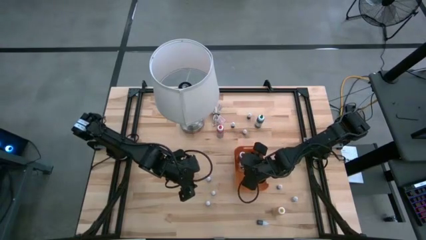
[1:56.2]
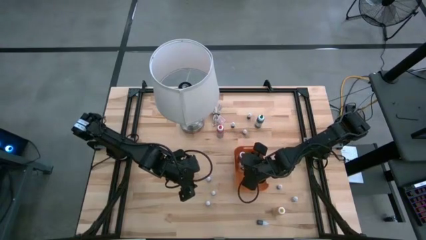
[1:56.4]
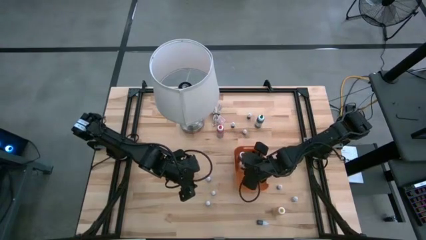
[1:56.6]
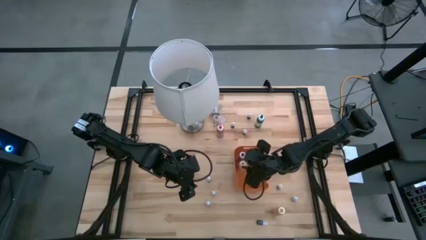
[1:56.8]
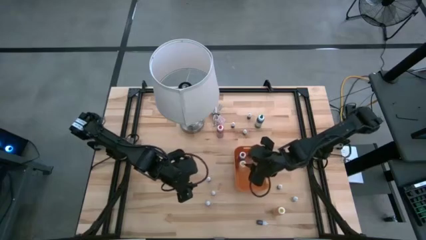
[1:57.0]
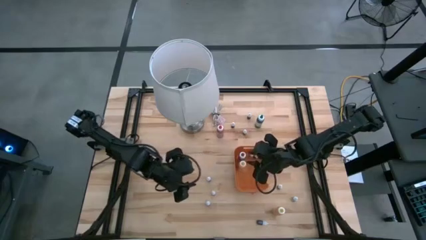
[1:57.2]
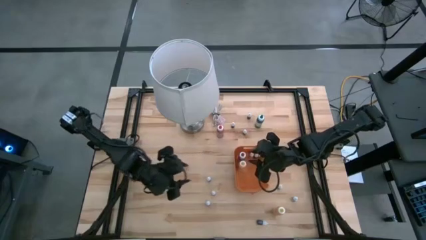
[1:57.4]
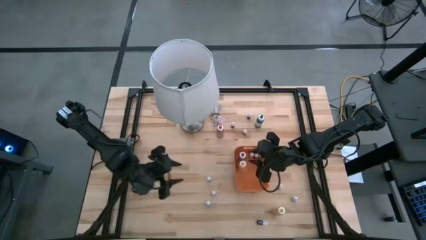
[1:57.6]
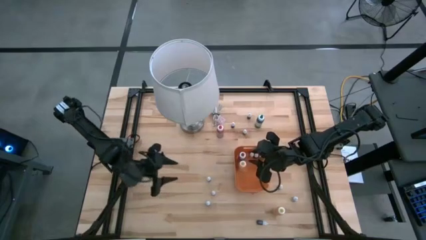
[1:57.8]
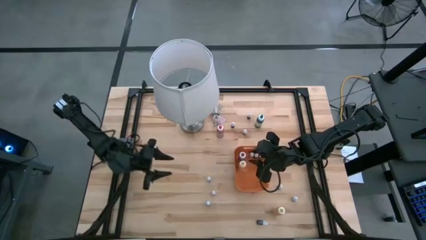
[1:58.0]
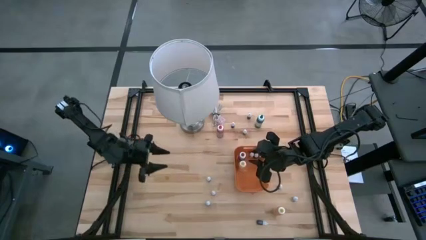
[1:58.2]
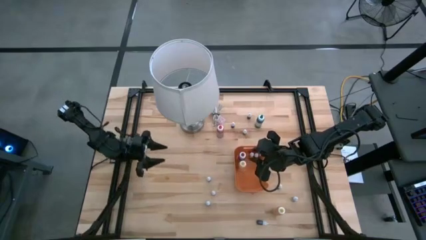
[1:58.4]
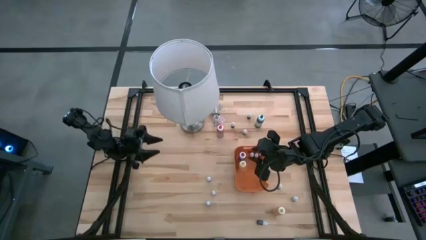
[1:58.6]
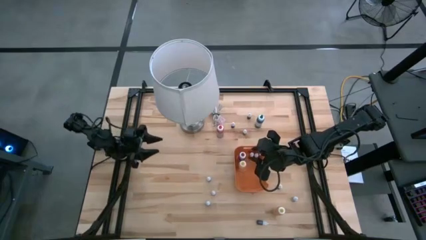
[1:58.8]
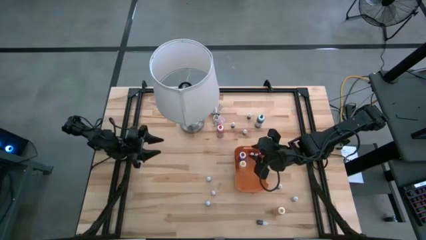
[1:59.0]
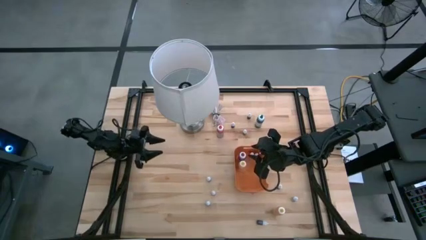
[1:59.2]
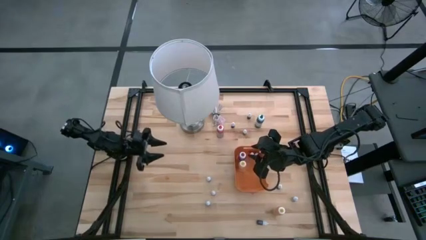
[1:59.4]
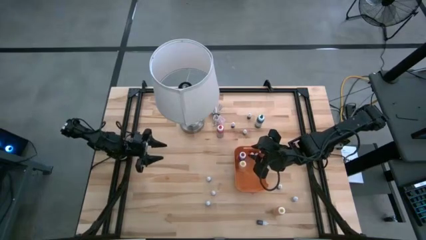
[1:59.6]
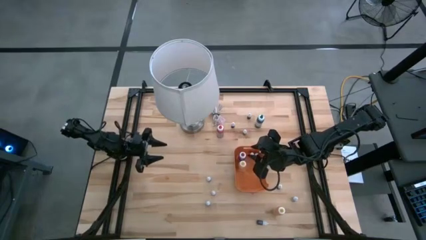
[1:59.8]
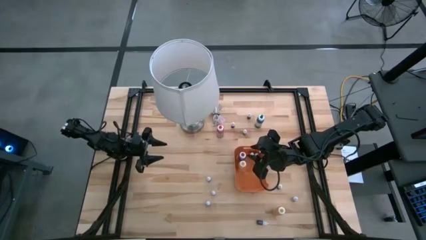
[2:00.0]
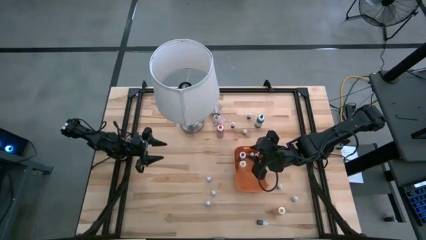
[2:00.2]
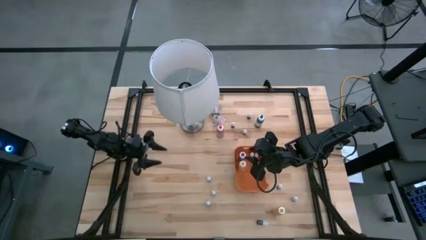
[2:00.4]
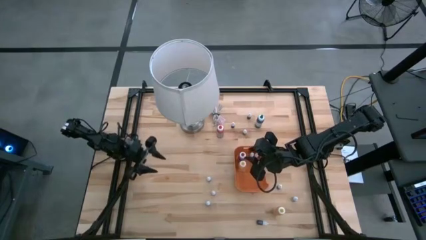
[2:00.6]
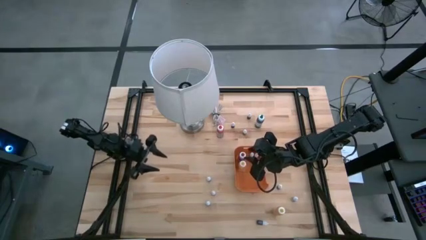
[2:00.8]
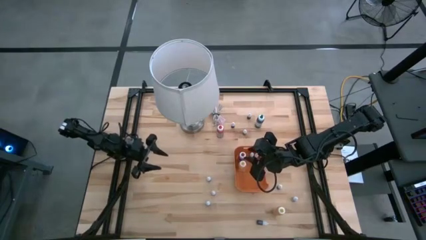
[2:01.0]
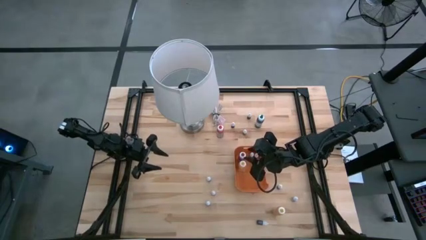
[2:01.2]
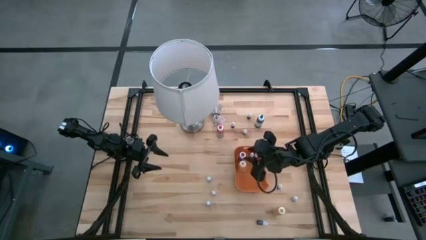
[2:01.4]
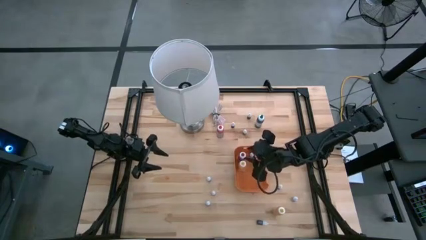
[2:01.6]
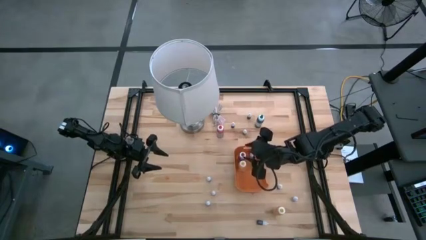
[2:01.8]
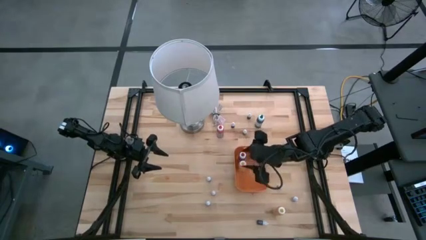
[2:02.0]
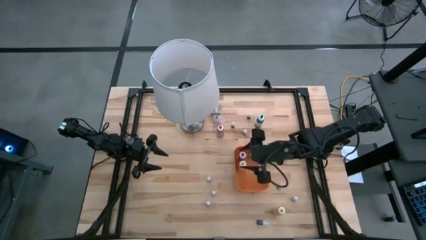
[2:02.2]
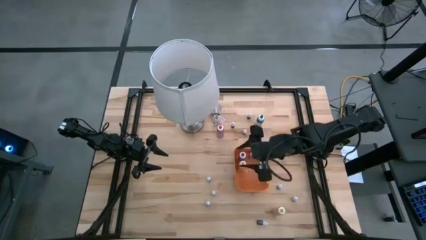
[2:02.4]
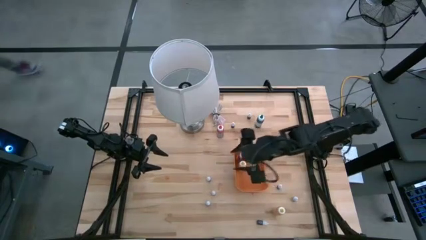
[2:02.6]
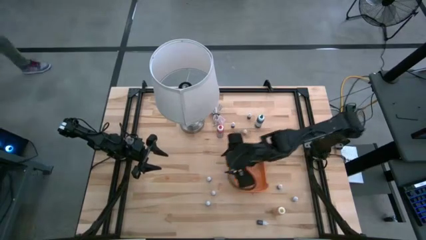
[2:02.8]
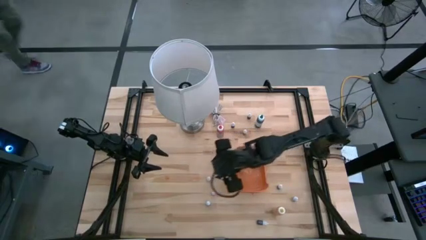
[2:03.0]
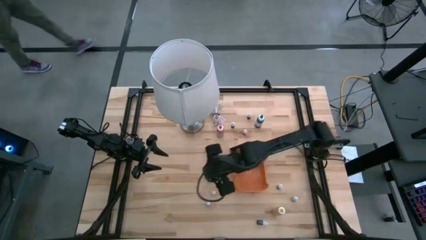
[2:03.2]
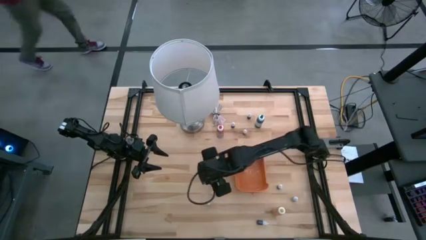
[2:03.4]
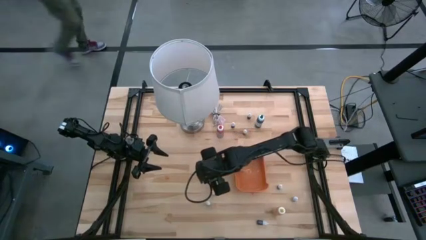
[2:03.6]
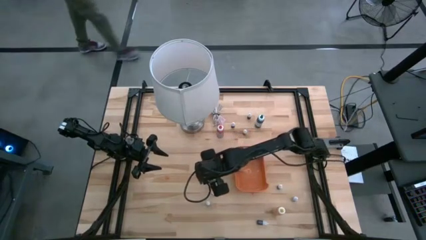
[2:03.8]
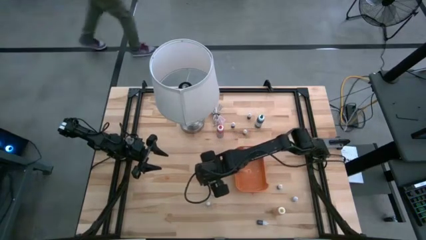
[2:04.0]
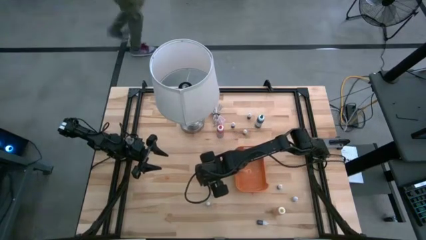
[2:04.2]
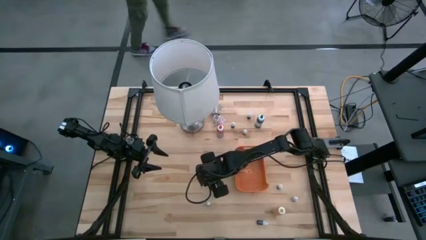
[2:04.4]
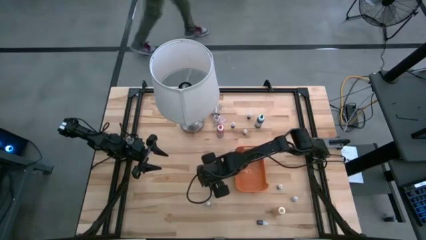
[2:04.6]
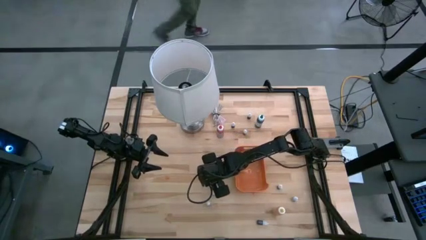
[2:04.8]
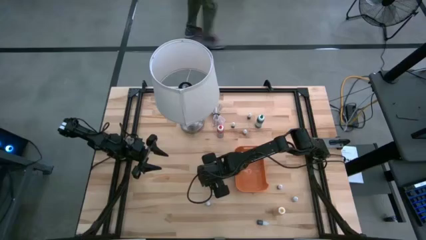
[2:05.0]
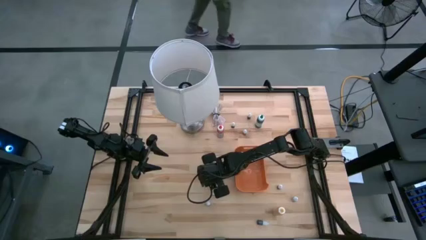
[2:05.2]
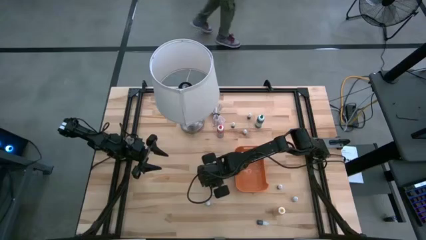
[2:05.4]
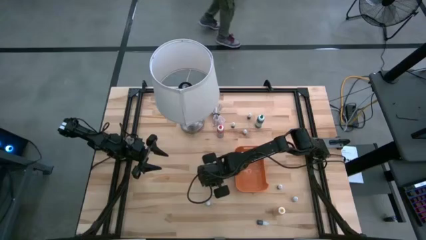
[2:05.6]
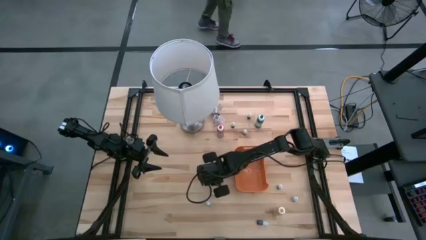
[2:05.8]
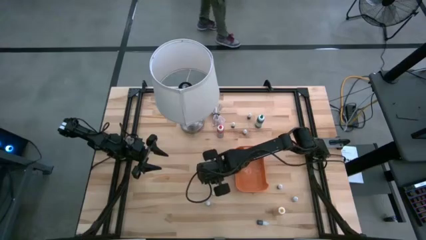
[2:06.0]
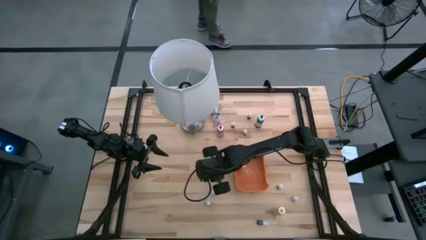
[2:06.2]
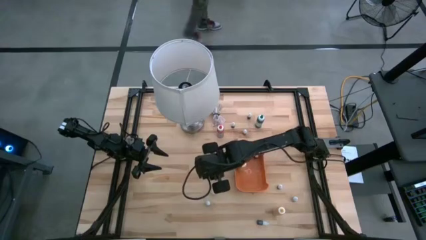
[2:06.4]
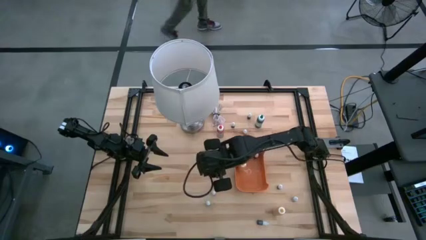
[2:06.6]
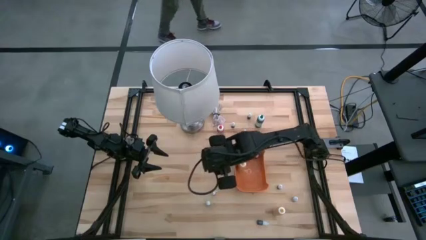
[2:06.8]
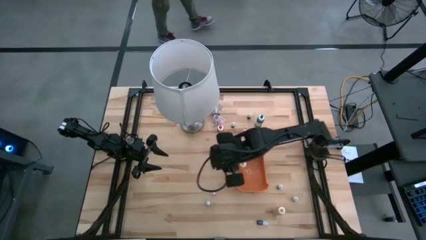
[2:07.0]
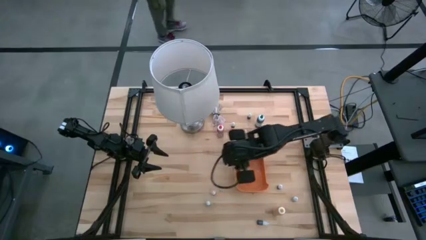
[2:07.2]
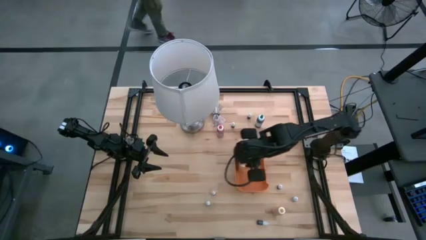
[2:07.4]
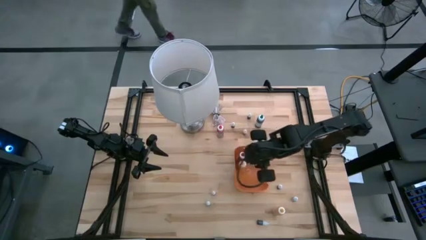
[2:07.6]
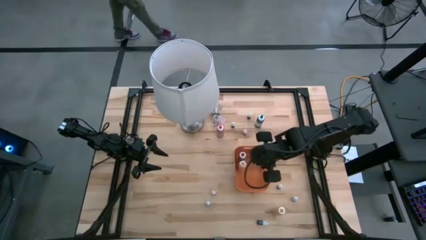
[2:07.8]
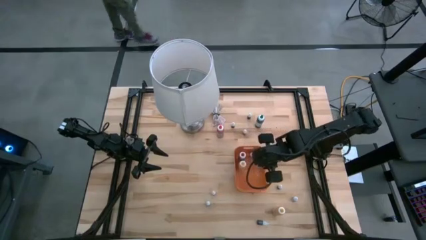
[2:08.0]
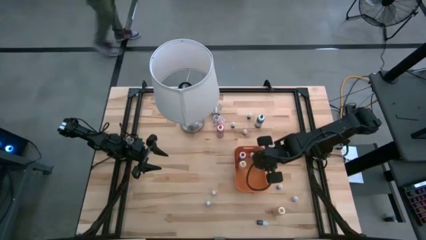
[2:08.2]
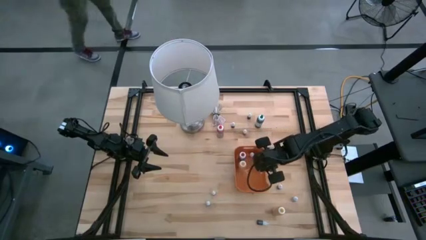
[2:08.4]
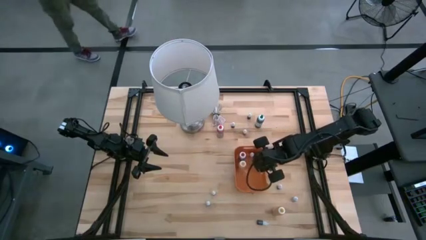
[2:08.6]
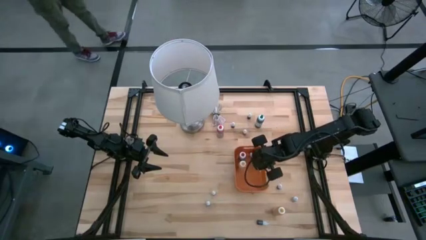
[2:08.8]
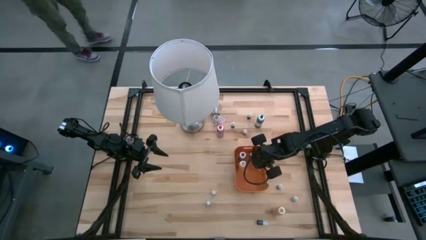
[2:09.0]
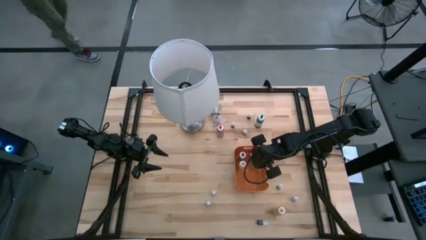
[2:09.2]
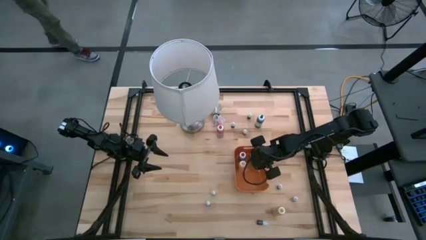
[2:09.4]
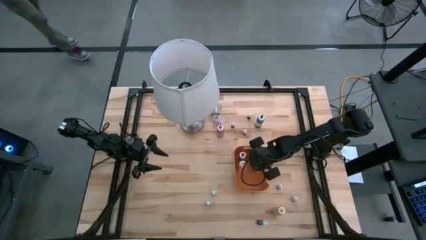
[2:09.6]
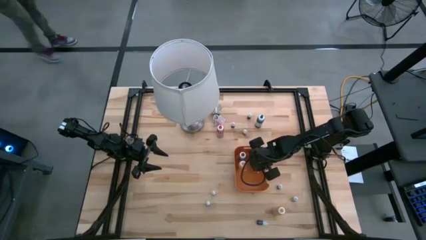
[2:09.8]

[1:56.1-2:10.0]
Task: Pick & Place food coloring
Put the small food coloring bottle into the orange bin
